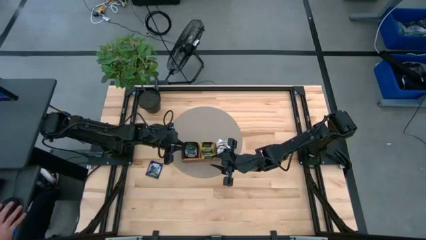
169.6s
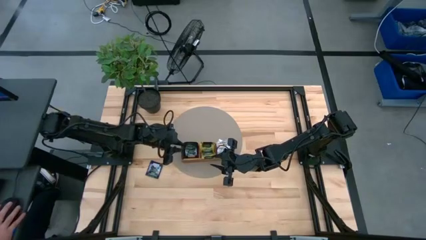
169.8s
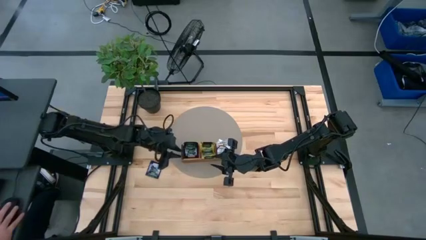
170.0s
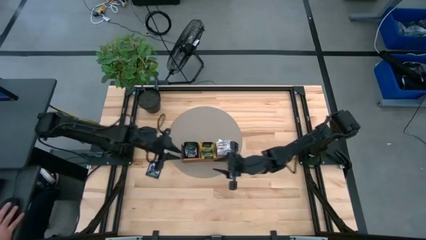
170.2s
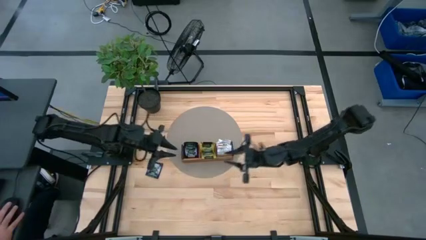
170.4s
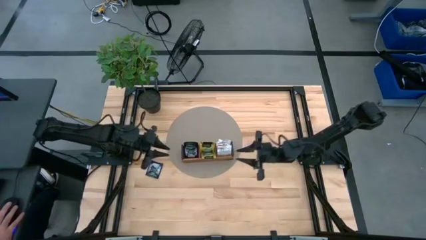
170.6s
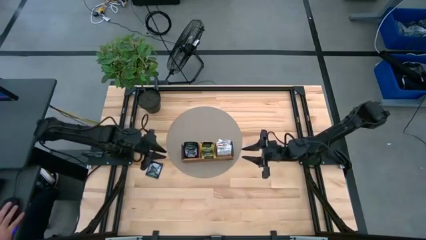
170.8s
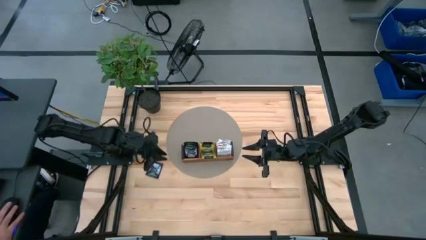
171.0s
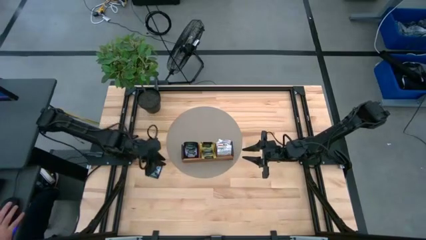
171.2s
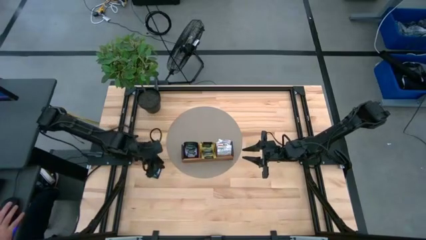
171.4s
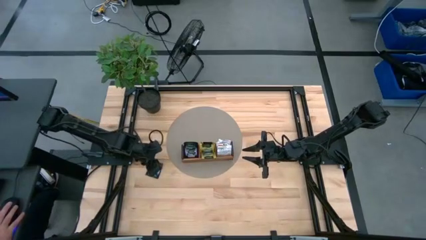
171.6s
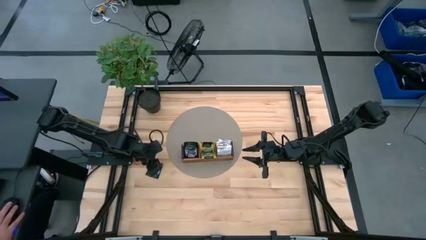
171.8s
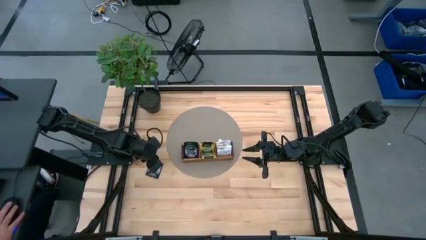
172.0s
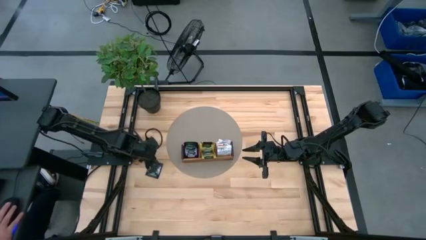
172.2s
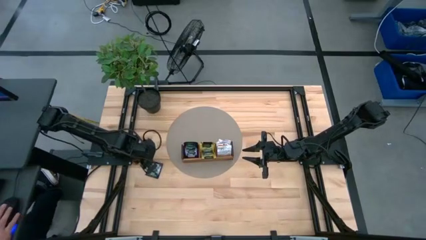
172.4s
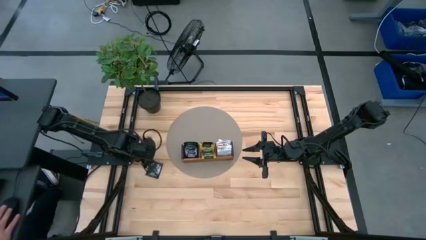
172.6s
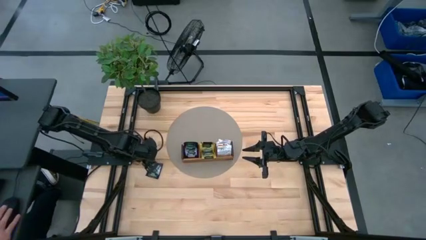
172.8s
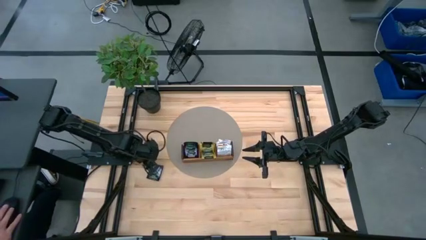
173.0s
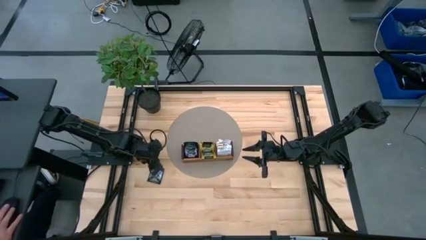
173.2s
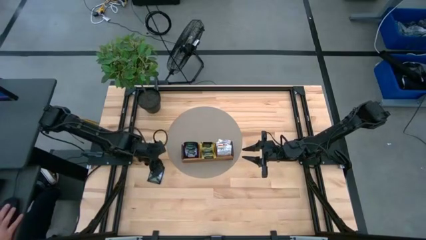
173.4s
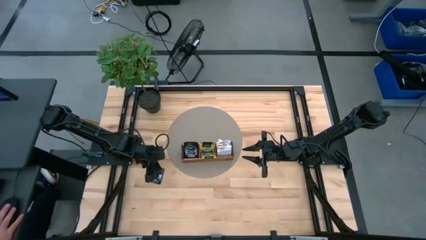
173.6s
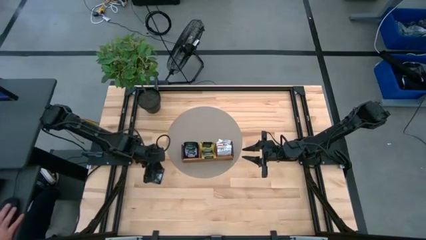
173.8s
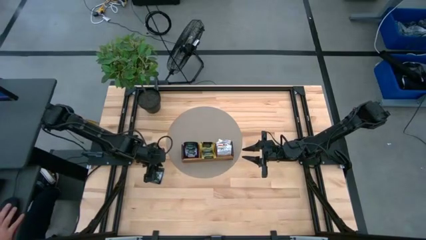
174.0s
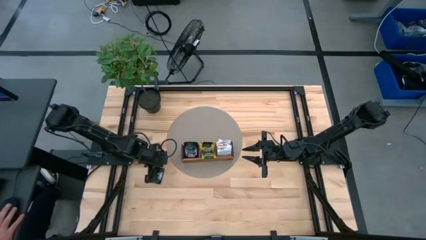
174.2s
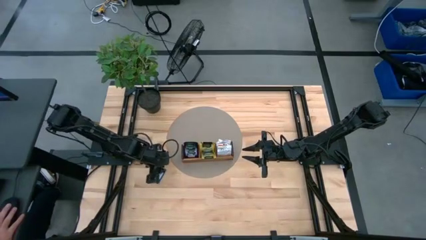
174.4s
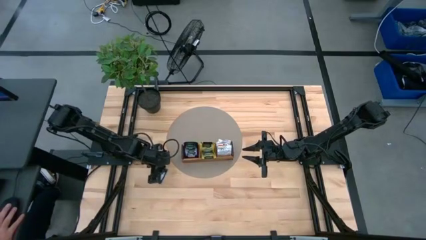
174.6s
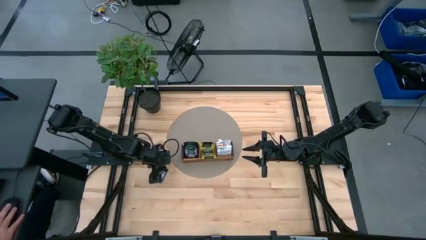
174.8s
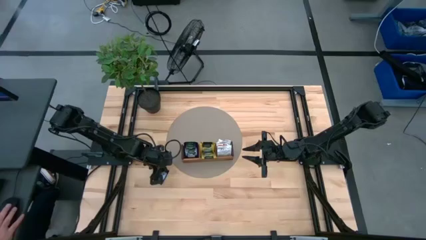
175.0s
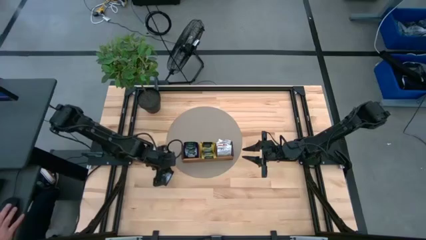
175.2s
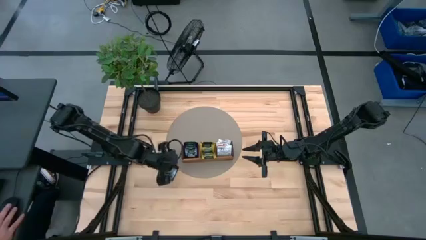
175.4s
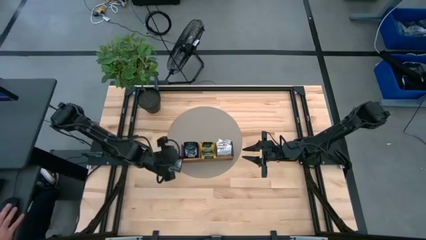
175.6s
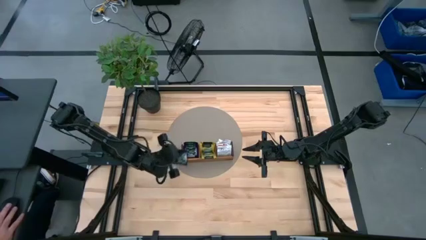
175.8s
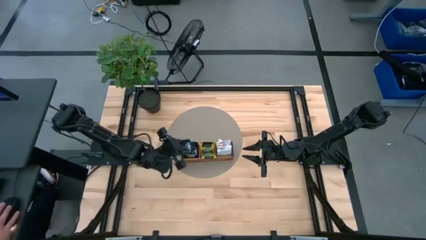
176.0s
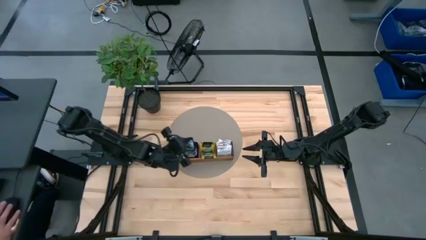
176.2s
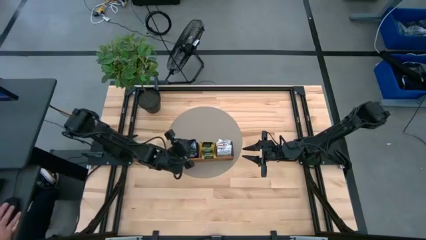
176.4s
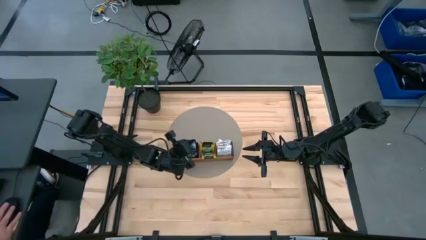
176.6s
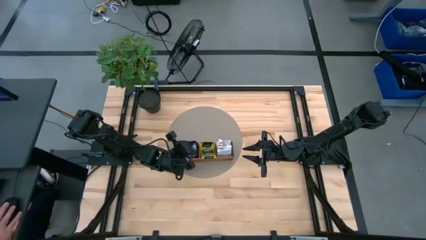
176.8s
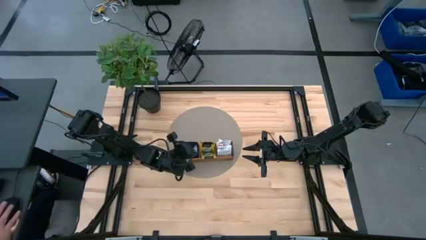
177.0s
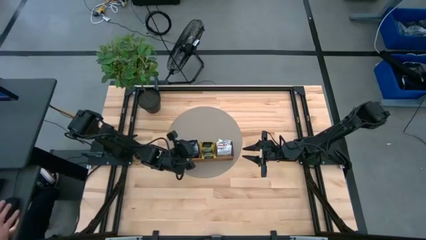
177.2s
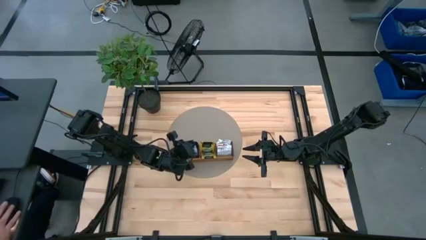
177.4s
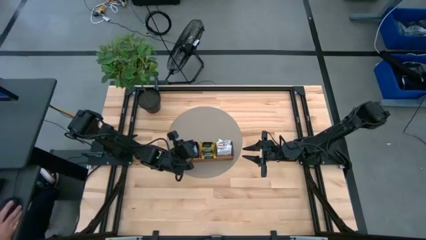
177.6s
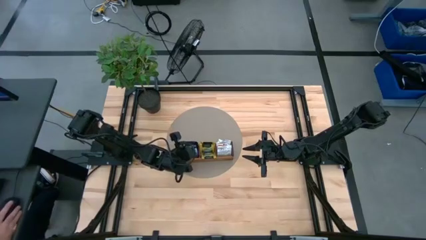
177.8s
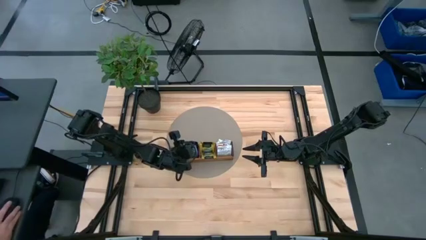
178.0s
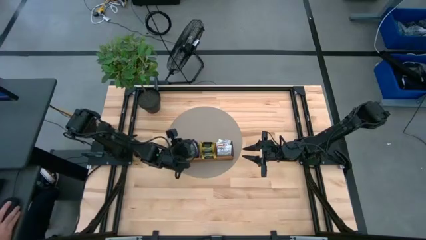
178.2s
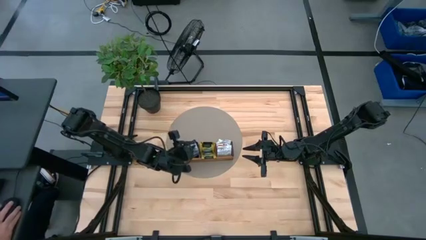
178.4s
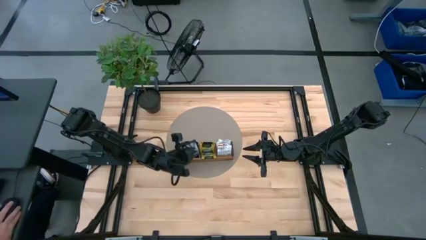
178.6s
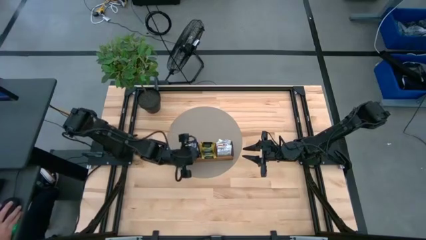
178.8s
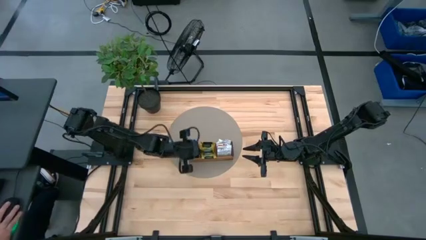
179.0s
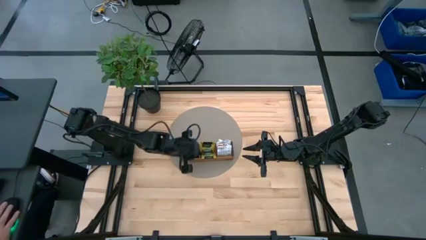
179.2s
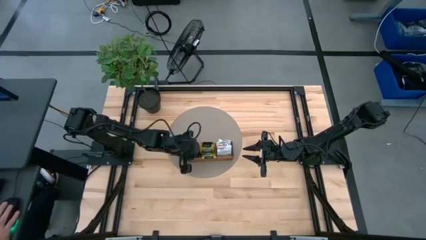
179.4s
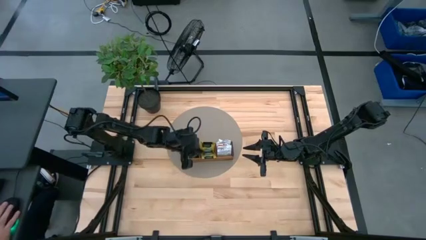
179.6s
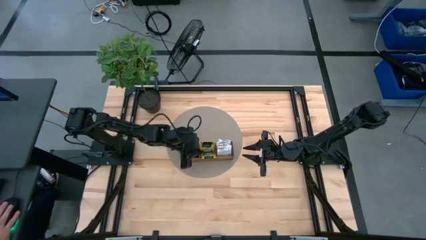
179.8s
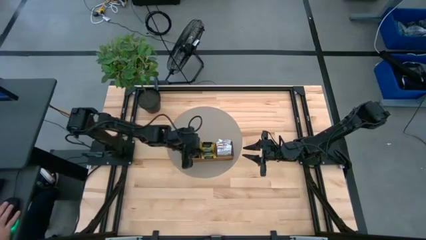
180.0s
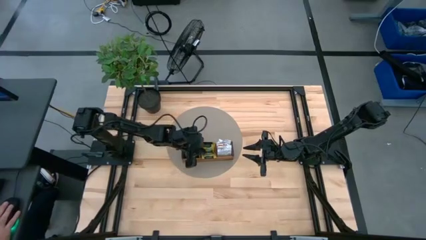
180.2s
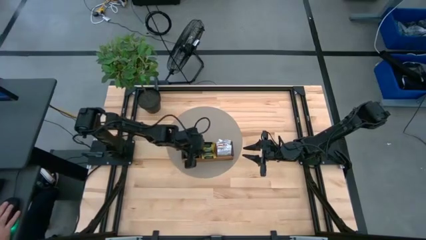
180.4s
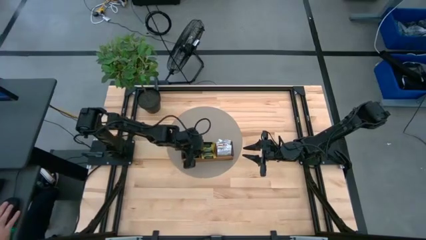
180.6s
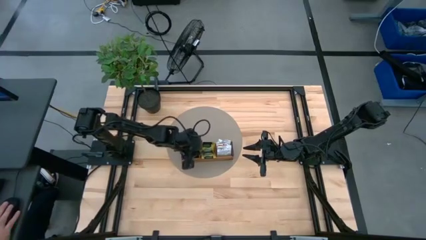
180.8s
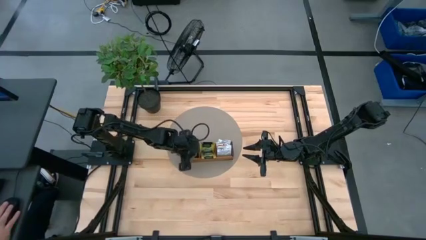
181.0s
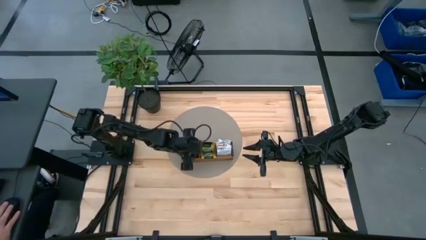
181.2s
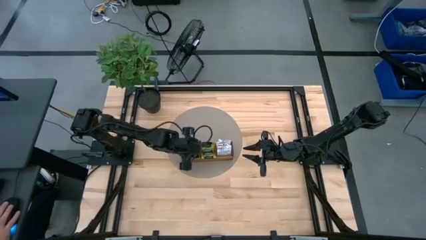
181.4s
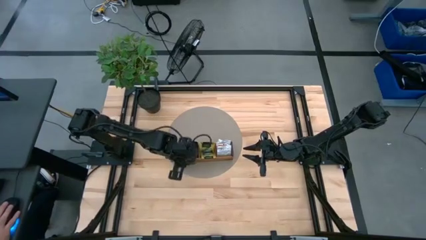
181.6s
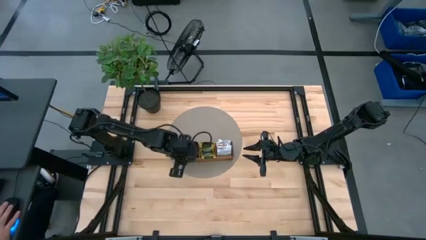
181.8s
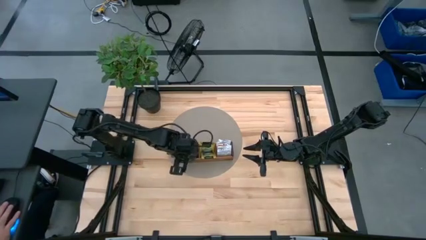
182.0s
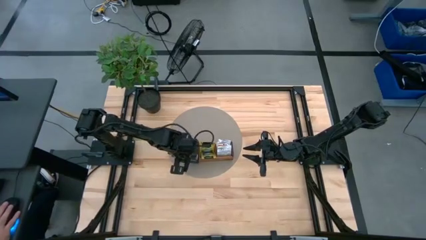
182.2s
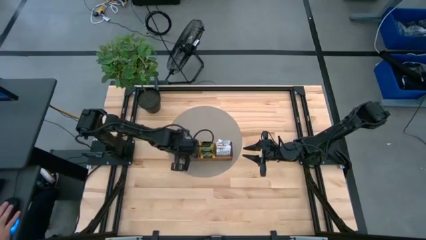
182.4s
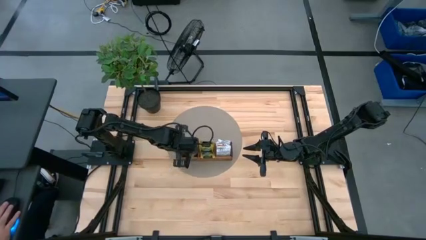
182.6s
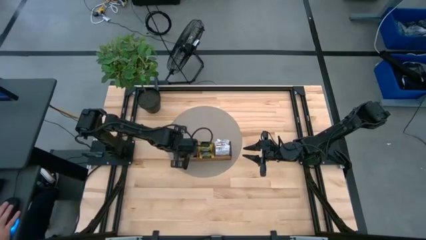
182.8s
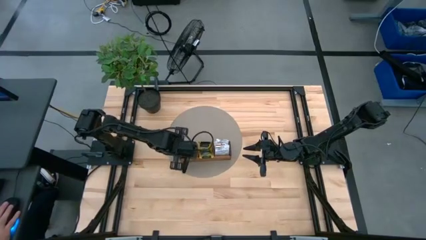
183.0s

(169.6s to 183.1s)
Task: Pick & Place Tea
Put the purple tea bag into the left section of the wooden organizer

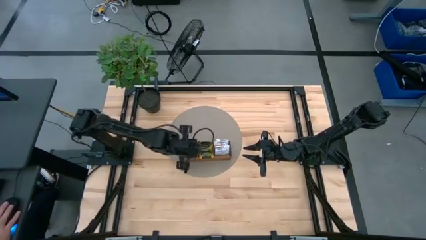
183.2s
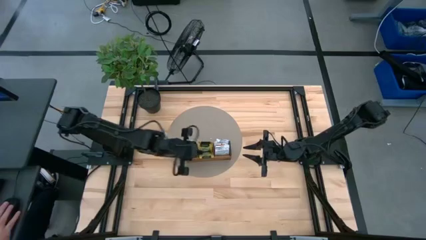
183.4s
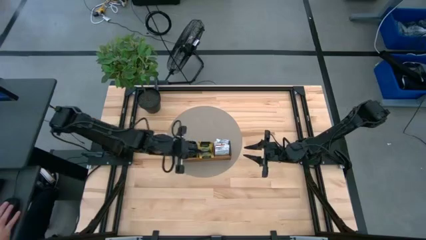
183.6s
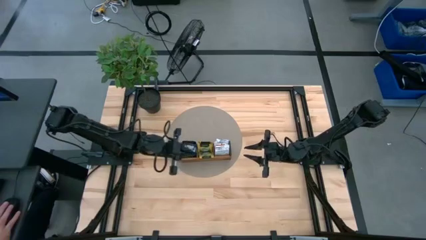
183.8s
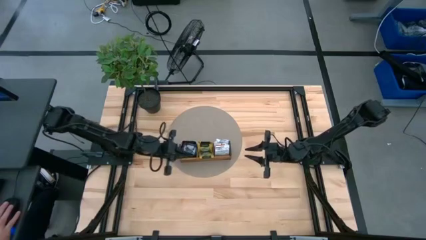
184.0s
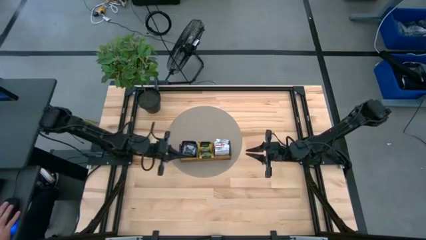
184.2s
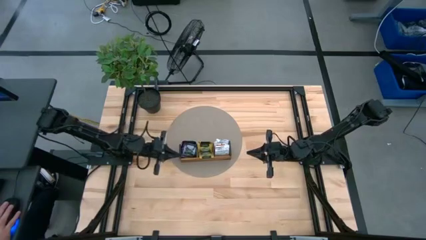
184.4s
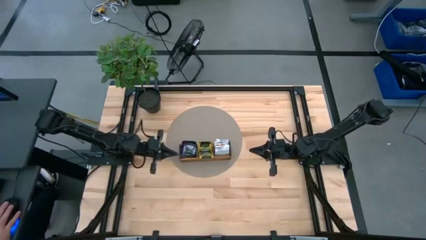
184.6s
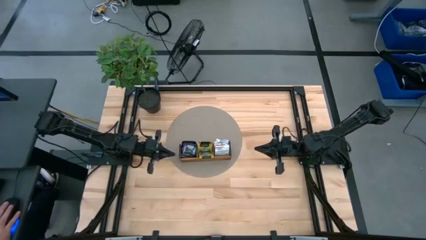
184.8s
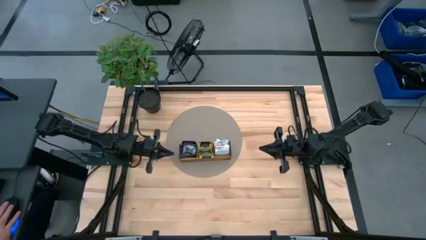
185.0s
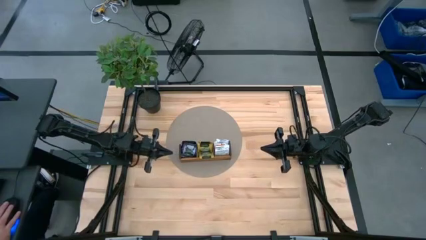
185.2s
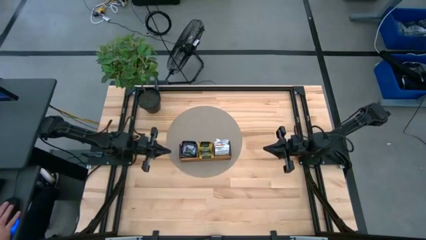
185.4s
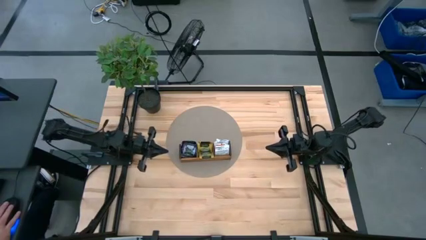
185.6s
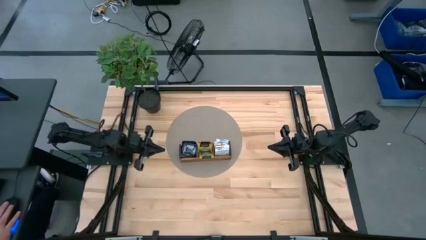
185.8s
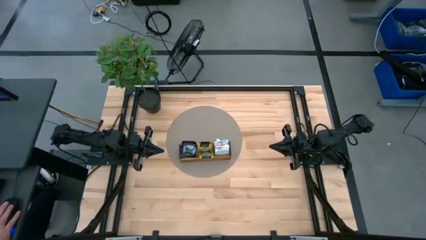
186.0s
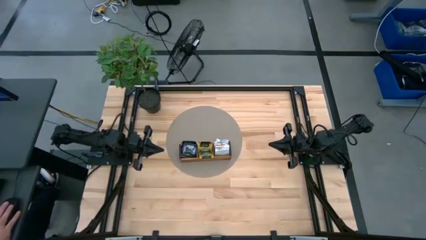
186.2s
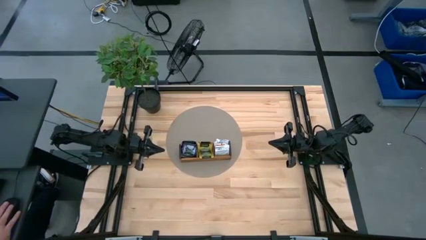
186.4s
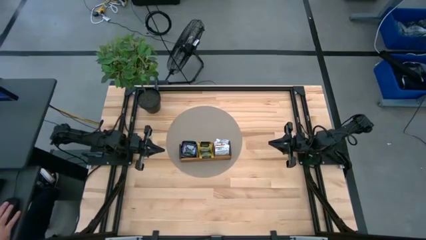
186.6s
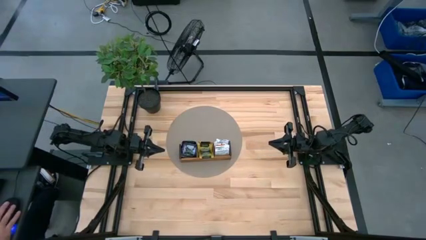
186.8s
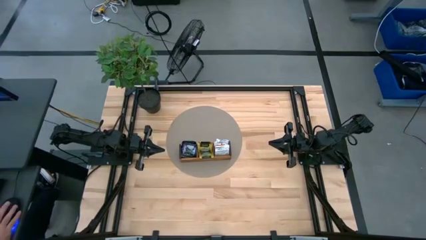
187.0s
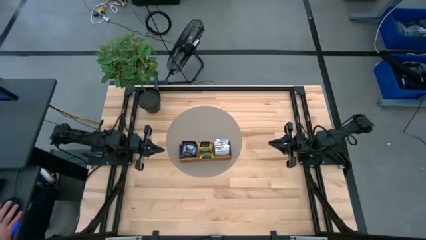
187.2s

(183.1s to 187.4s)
Return to Home Position
